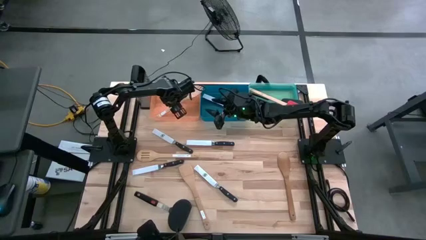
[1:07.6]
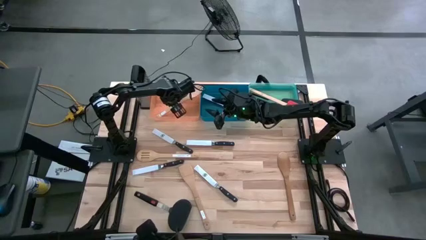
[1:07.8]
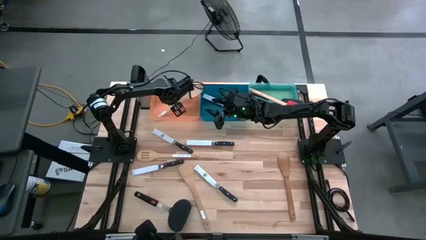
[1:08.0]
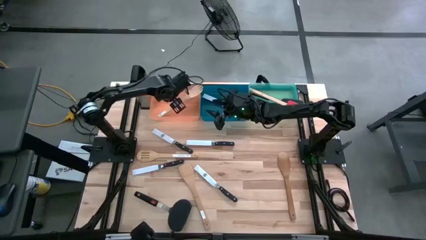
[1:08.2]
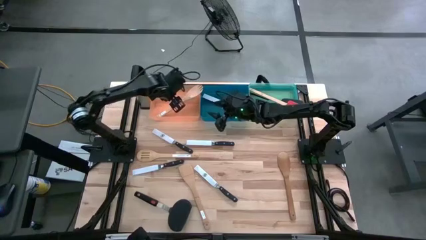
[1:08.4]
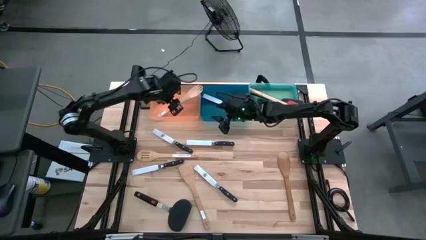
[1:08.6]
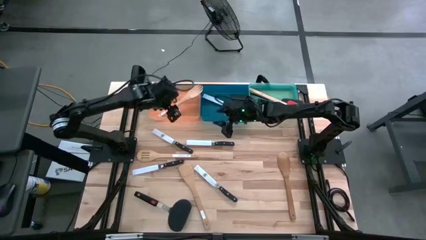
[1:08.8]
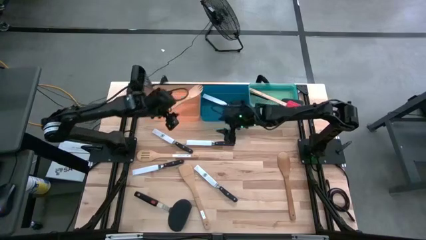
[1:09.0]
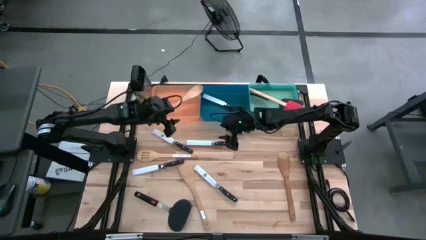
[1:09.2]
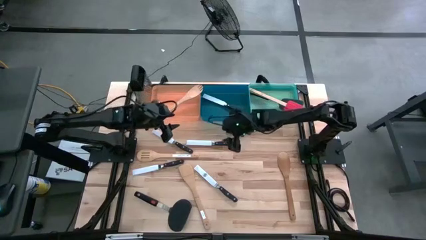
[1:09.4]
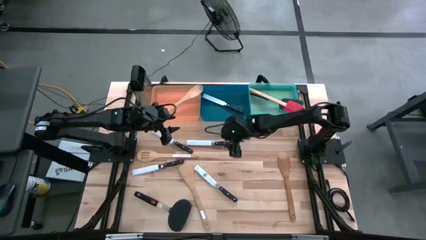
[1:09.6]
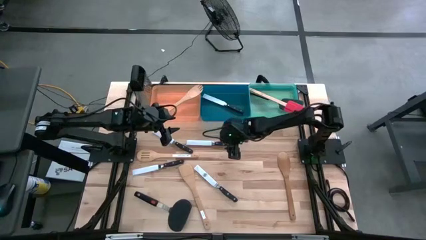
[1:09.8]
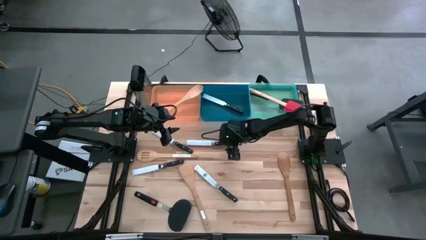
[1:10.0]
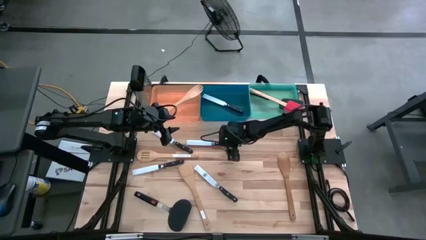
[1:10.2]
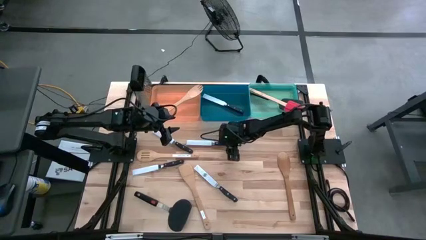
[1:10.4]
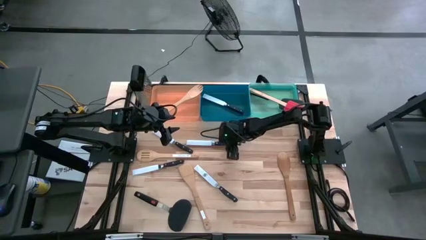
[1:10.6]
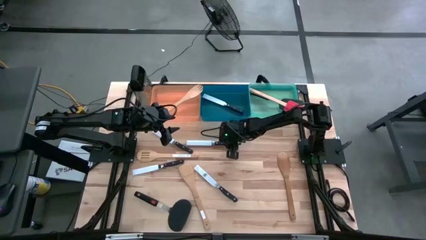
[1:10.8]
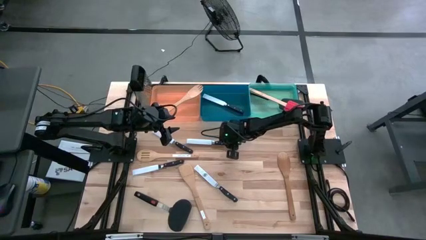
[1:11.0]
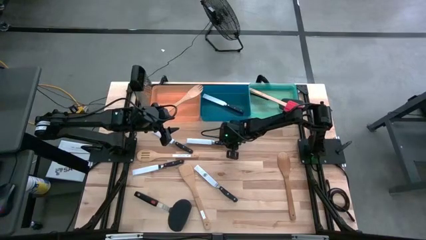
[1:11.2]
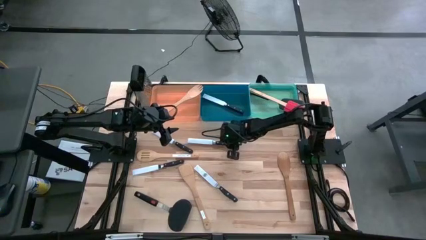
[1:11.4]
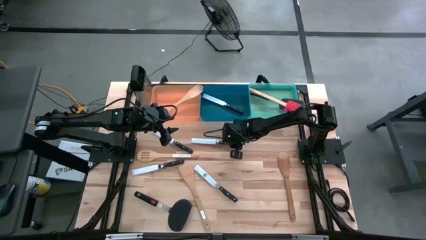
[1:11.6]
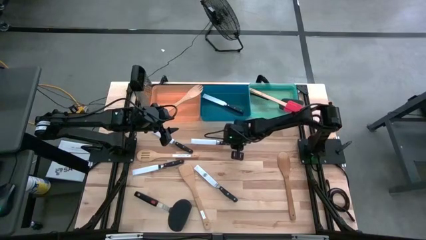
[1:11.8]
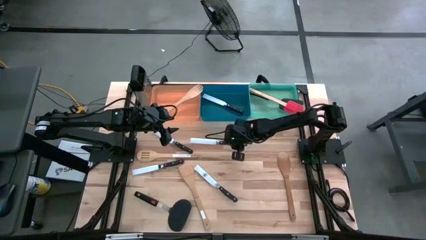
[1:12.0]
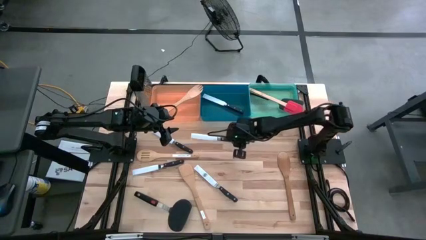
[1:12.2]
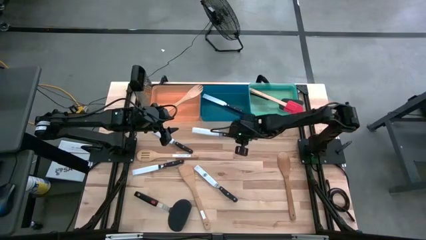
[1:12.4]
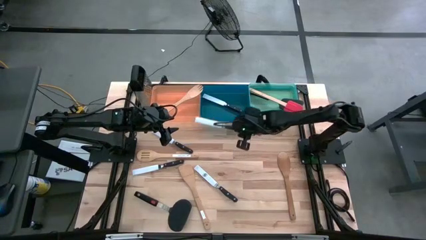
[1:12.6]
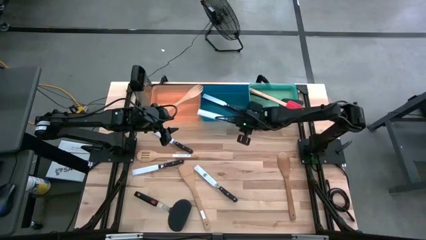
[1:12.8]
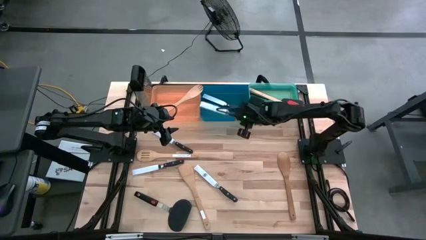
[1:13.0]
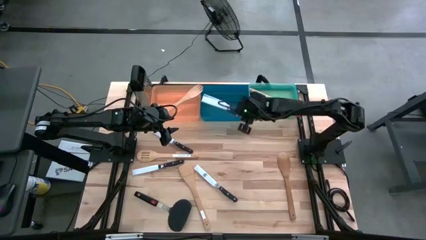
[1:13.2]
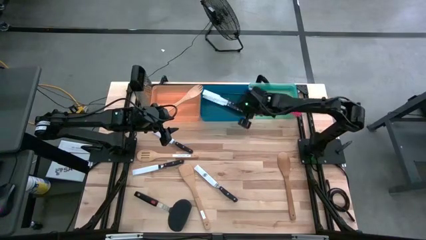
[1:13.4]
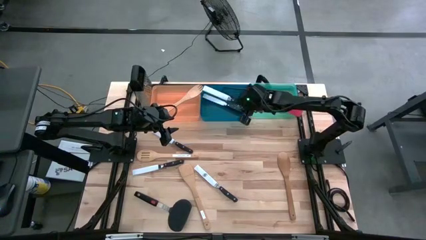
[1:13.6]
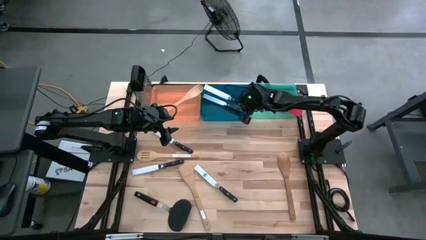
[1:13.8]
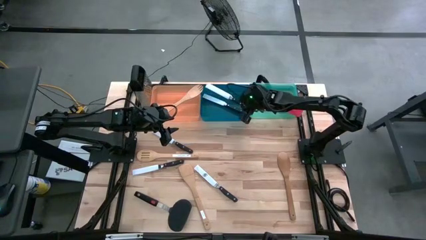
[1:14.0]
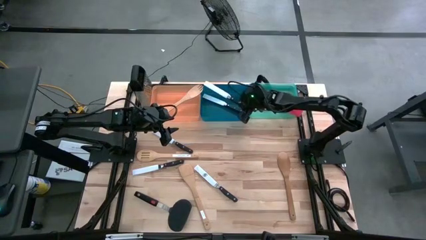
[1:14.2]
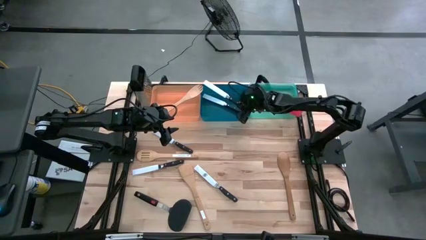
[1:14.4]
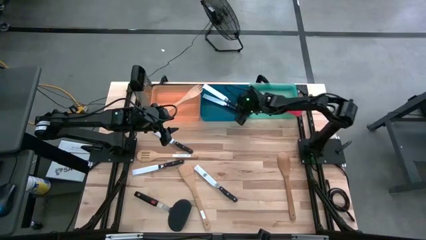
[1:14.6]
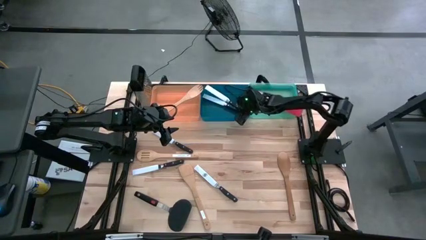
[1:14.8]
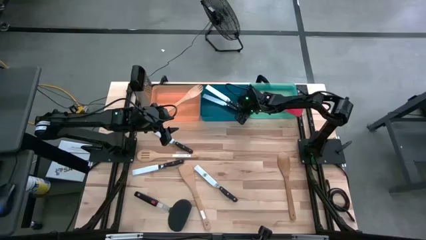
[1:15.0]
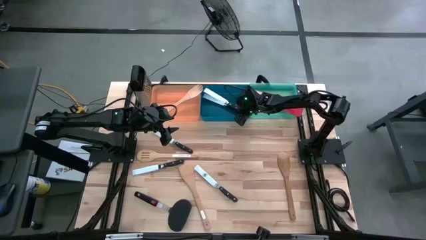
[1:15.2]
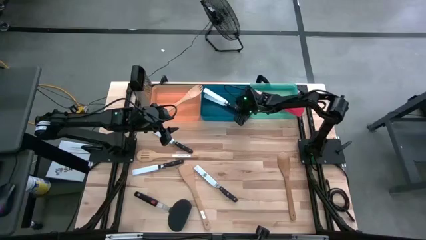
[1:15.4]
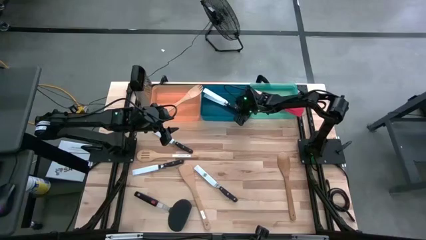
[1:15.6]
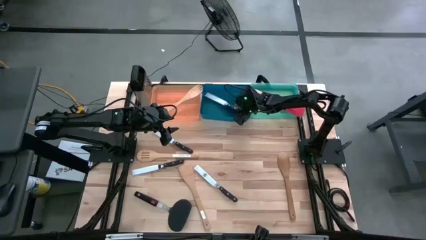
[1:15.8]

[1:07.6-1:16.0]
Task: Pick & Place Kitchen Items
Put the knife into the blue bin

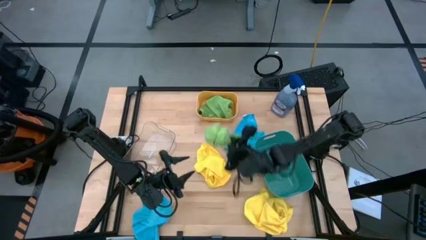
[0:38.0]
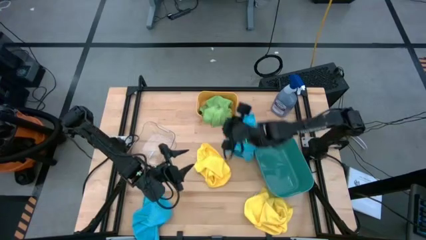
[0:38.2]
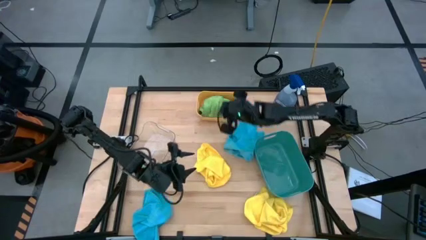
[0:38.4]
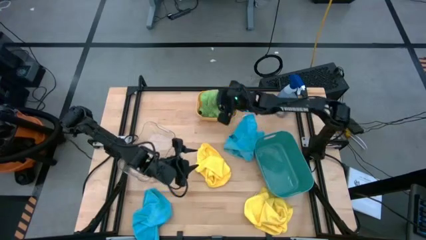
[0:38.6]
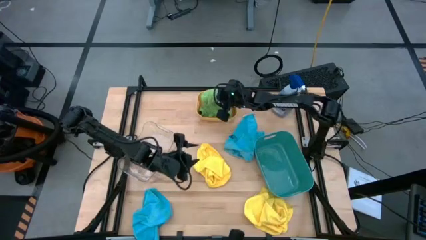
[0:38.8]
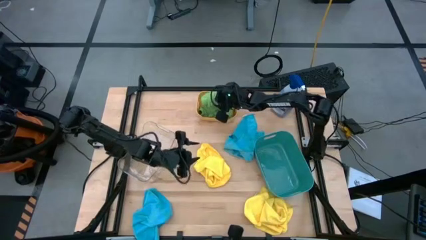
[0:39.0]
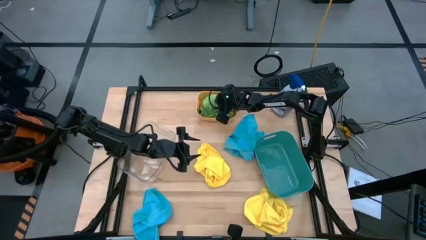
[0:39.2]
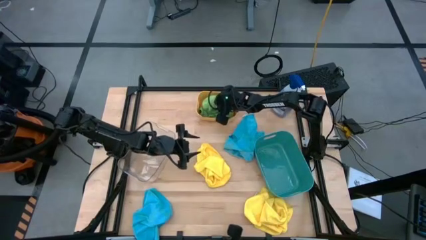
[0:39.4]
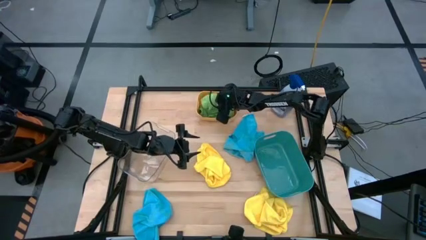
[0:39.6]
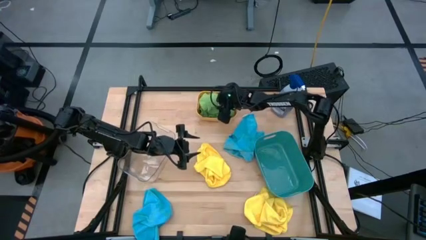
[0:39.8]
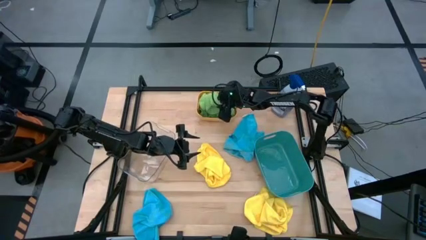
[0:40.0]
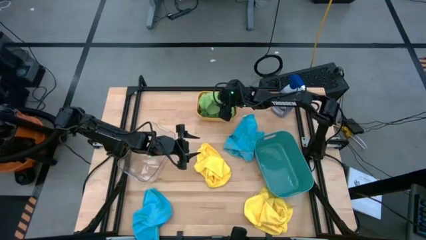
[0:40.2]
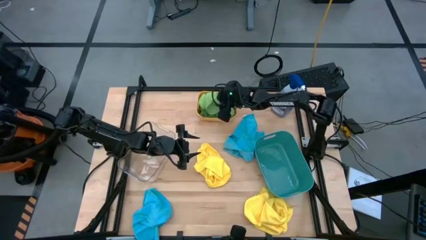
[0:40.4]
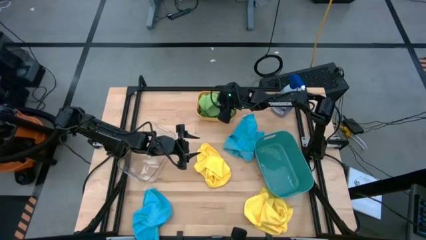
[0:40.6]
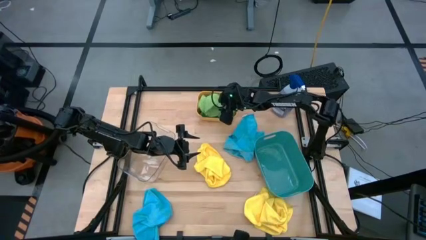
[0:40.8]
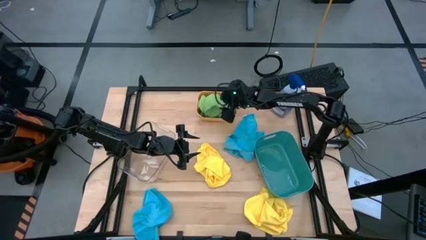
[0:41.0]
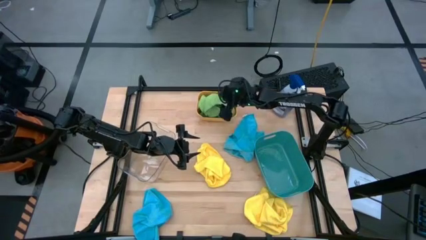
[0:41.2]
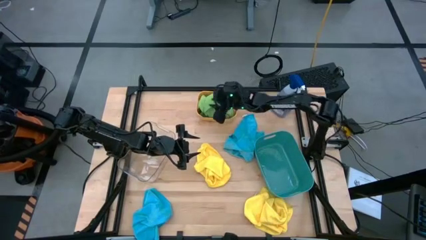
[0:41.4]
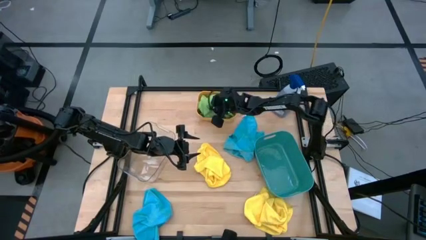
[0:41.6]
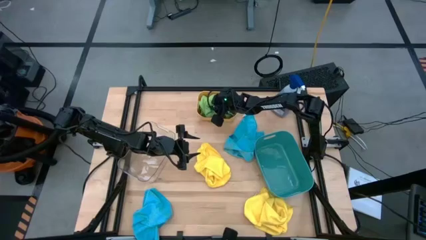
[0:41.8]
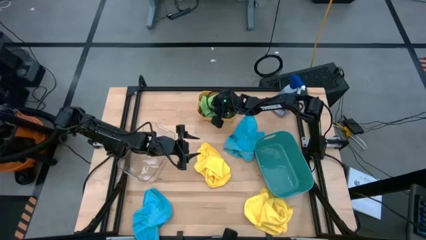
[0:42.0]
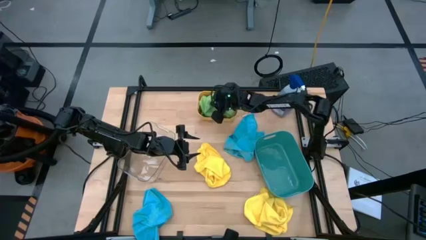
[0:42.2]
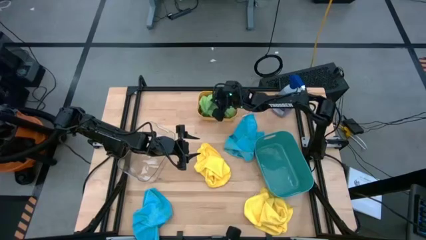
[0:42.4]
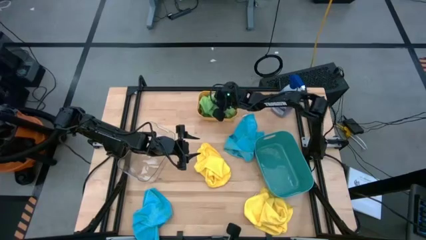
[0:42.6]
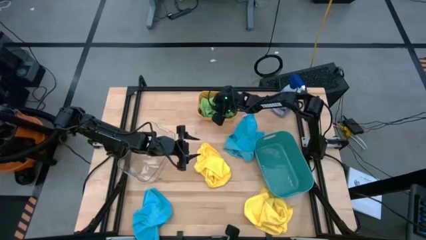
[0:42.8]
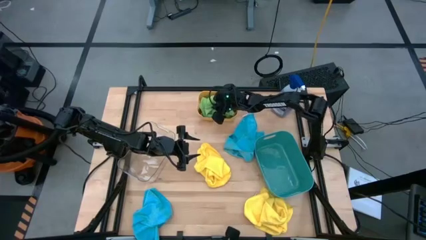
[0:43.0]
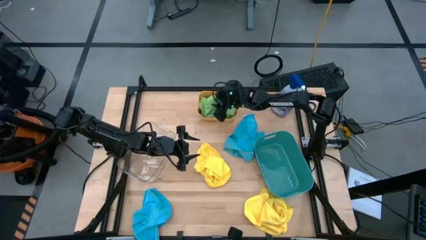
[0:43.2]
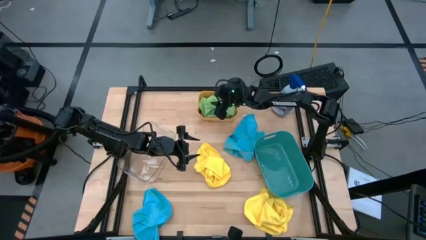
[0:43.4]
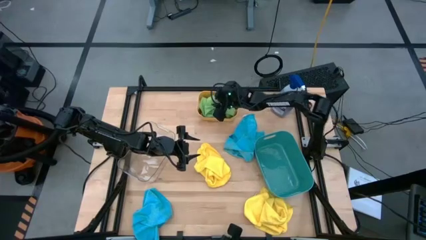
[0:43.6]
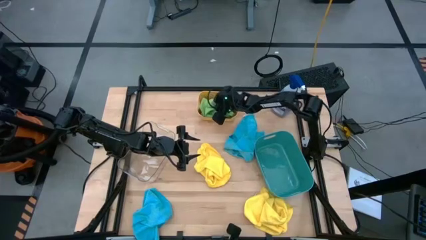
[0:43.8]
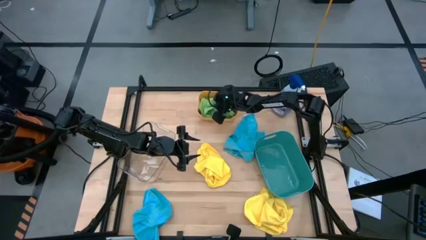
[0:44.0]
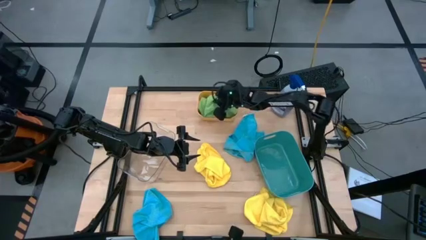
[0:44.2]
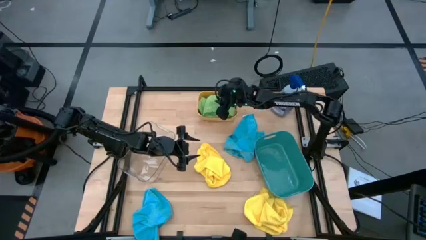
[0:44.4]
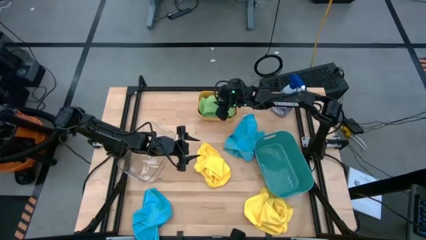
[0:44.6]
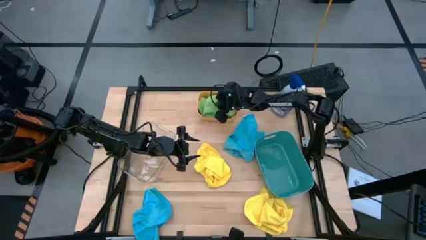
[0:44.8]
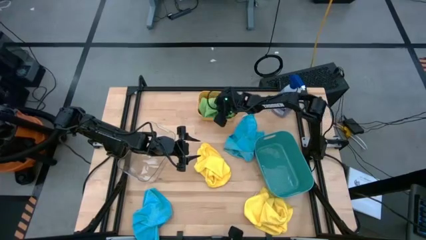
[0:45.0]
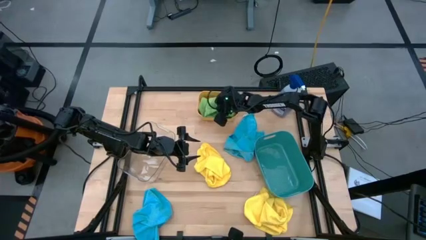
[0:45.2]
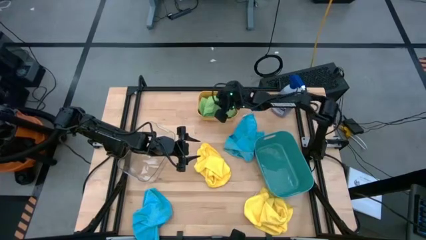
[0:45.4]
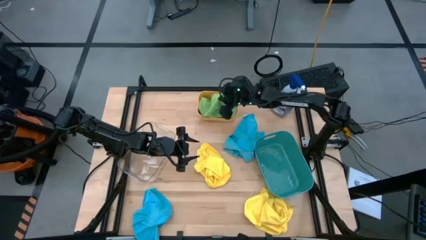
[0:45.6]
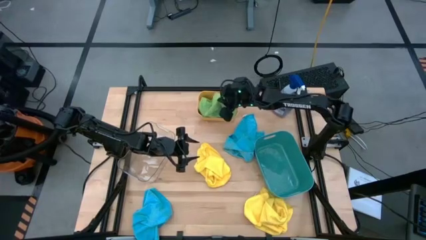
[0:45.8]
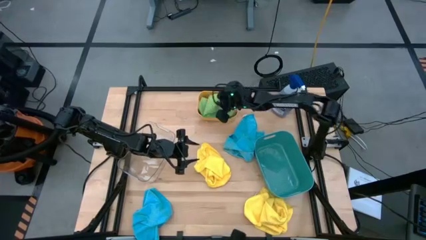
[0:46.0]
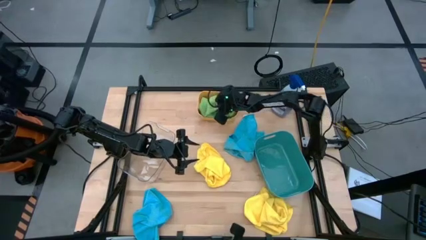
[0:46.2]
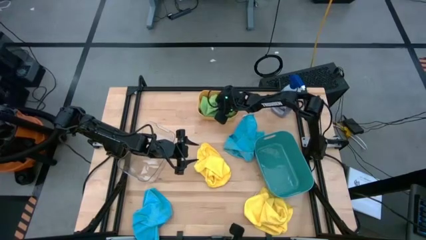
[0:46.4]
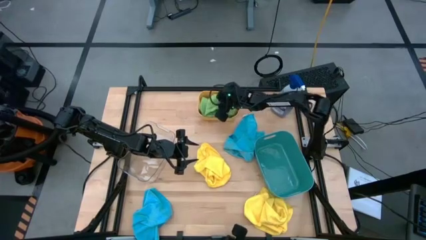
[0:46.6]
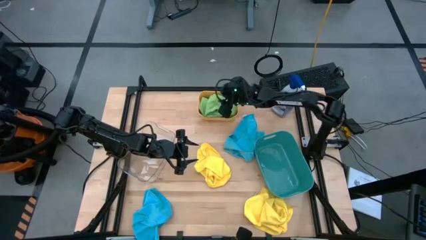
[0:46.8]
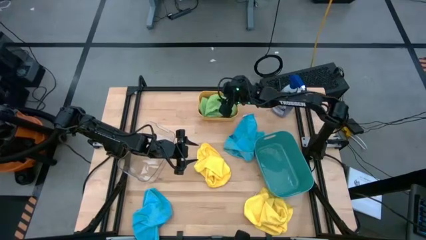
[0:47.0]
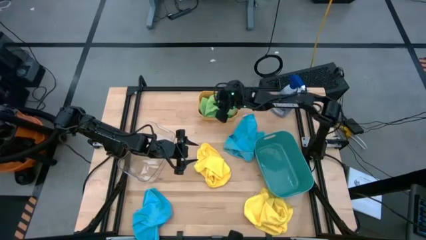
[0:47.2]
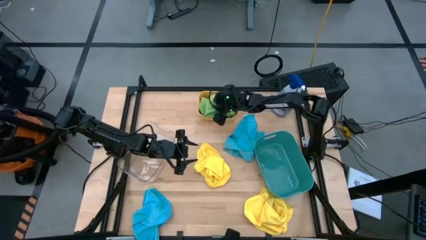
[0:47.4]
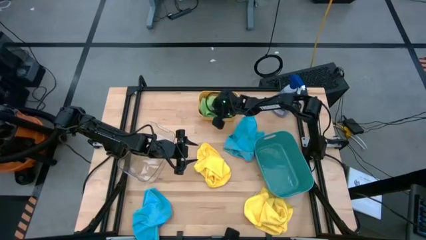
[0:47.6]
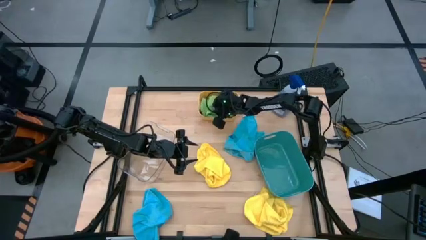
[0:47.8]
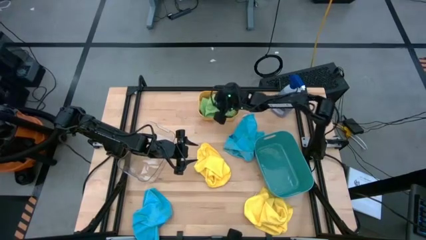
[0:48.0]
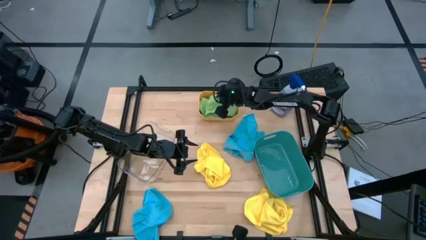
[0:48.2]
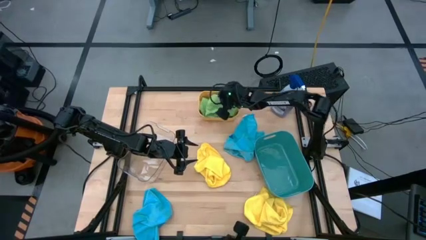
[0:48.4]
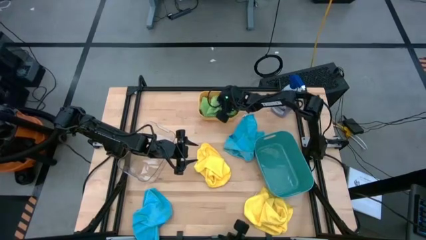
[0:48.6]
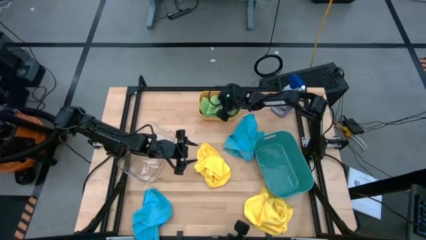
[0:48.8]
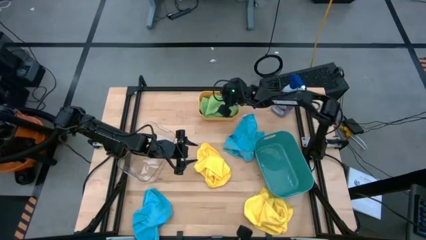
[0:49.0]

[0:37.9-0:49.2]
Task: Sort microfiber towel by color & place in baskets
Put the green microfiber cloth into the orange bin
